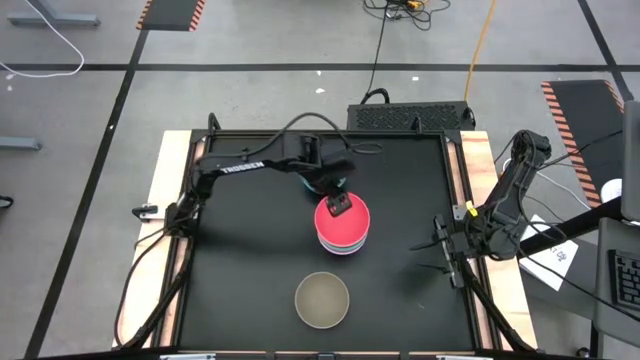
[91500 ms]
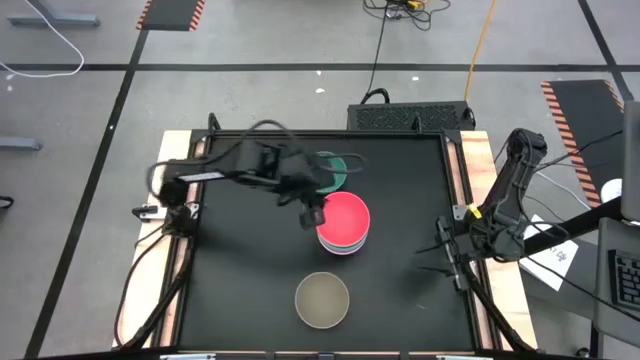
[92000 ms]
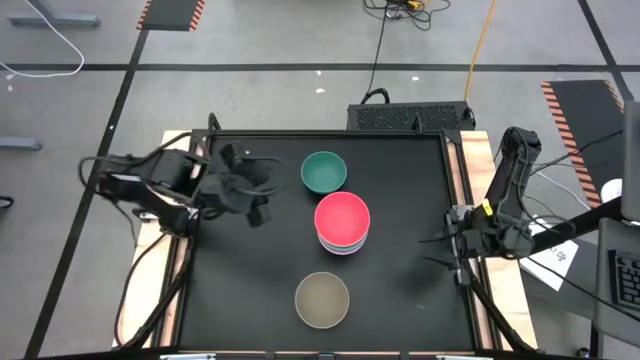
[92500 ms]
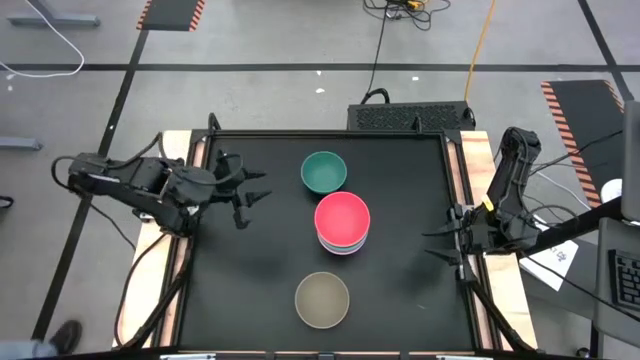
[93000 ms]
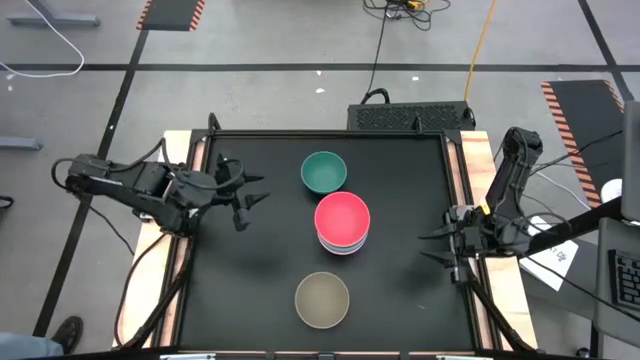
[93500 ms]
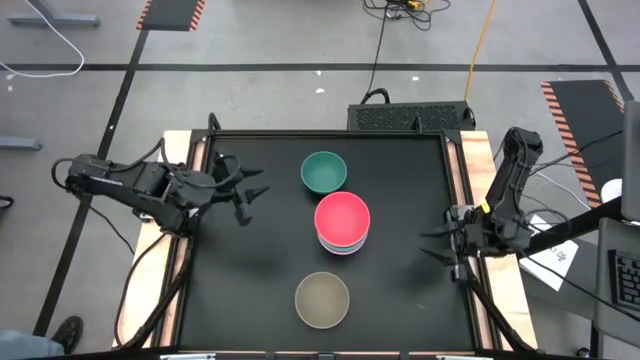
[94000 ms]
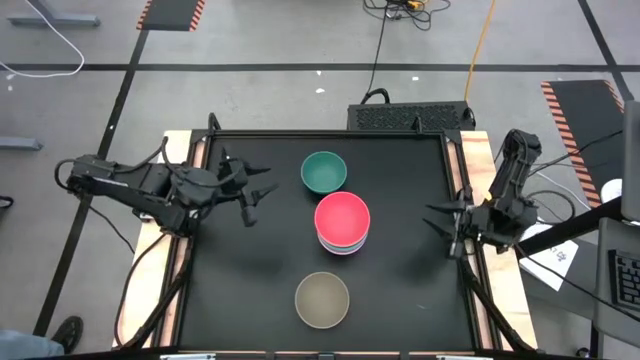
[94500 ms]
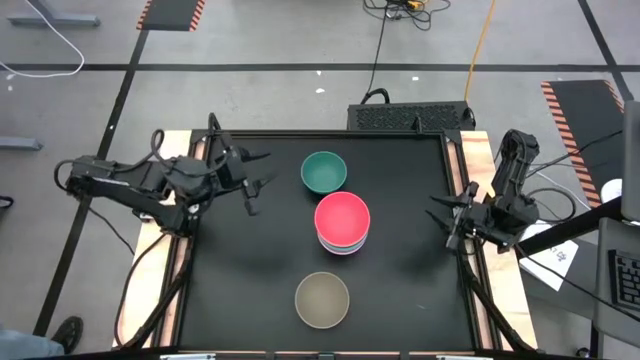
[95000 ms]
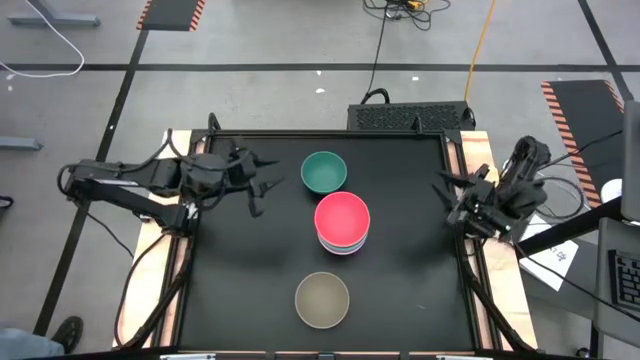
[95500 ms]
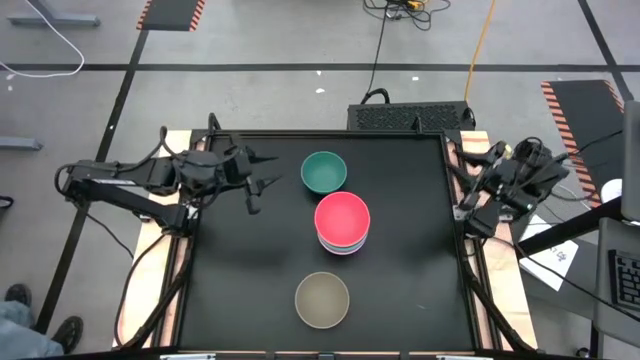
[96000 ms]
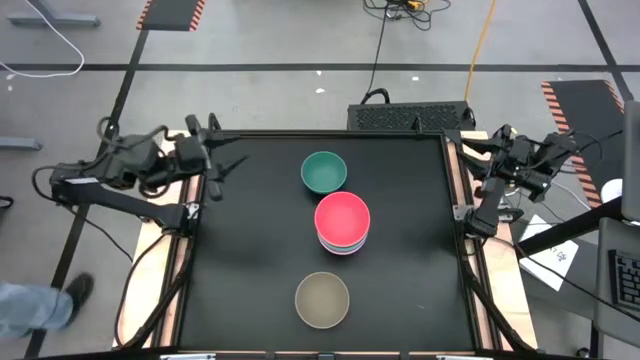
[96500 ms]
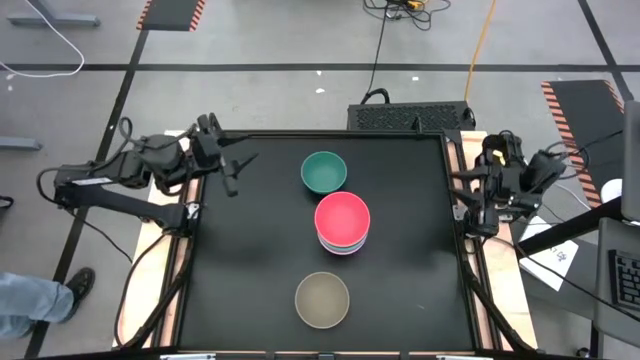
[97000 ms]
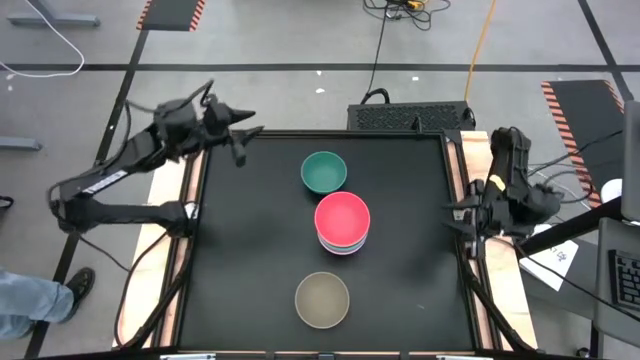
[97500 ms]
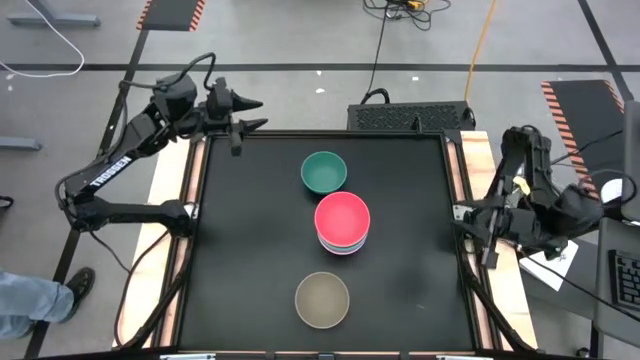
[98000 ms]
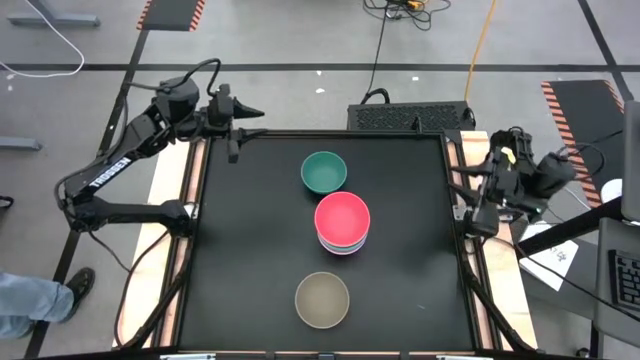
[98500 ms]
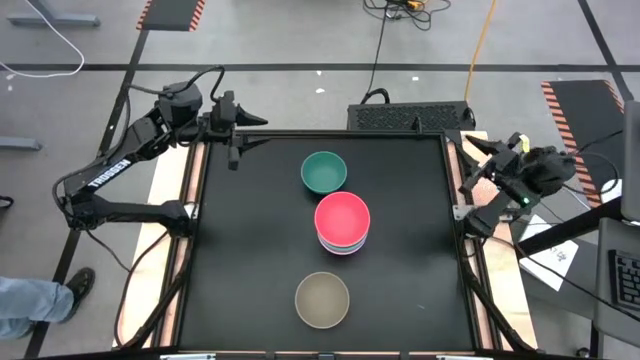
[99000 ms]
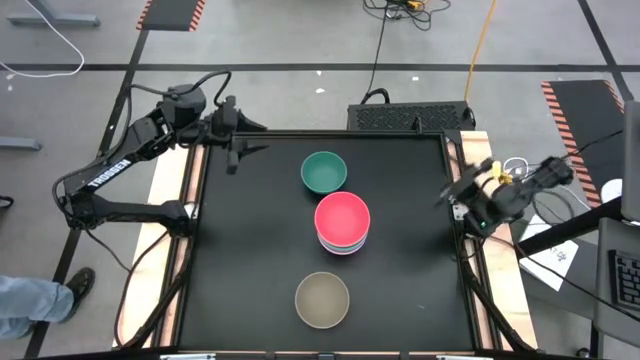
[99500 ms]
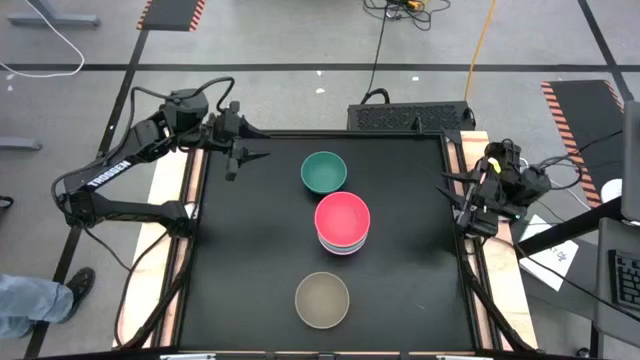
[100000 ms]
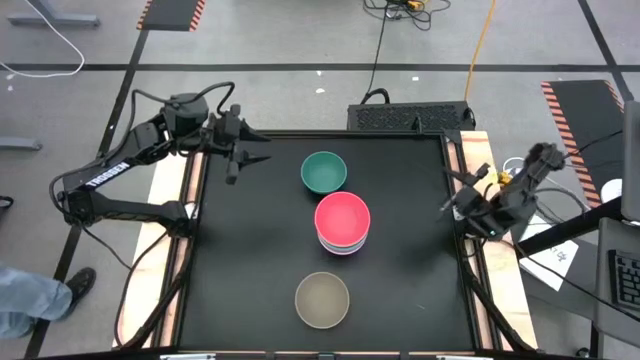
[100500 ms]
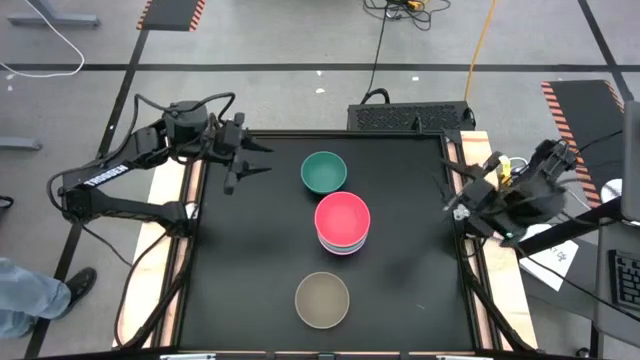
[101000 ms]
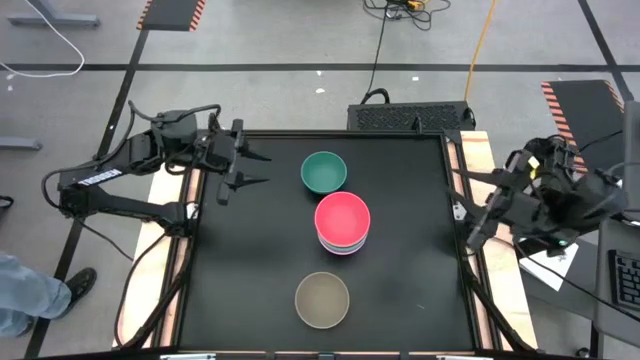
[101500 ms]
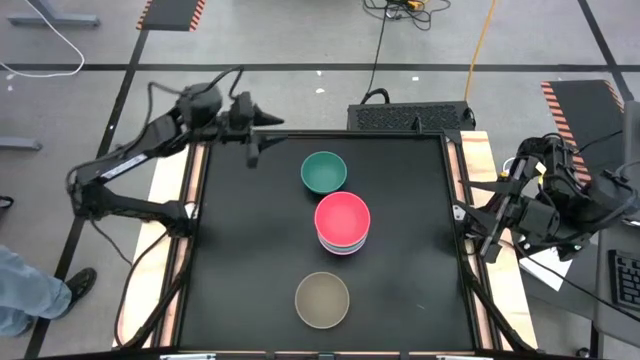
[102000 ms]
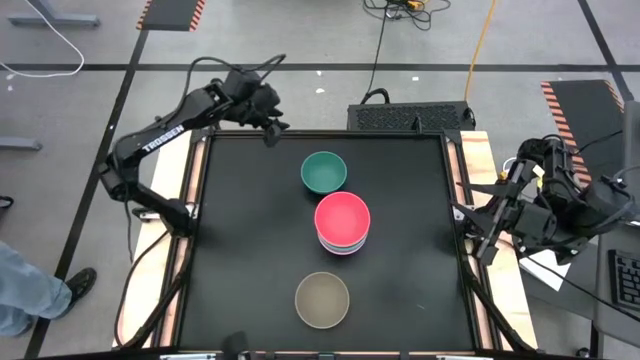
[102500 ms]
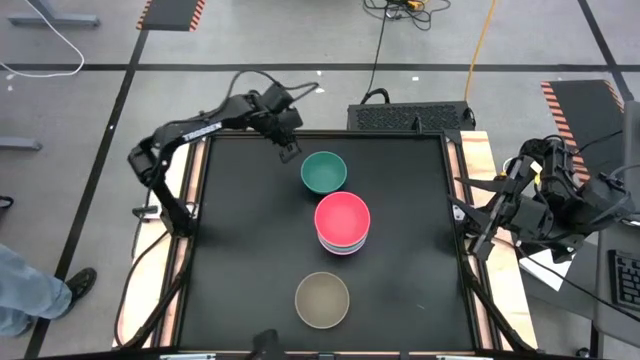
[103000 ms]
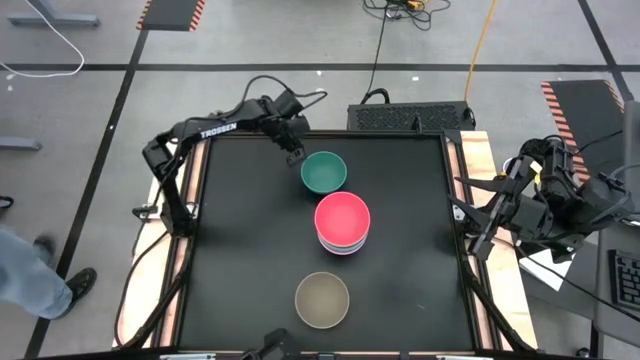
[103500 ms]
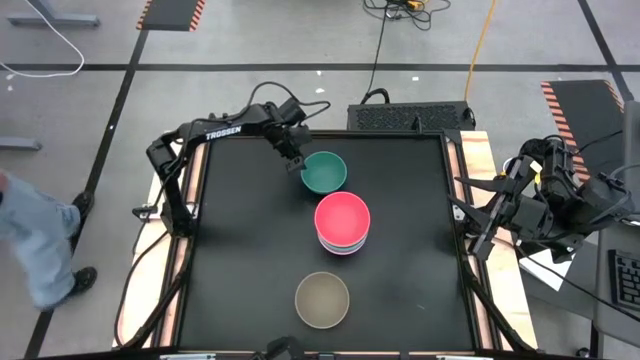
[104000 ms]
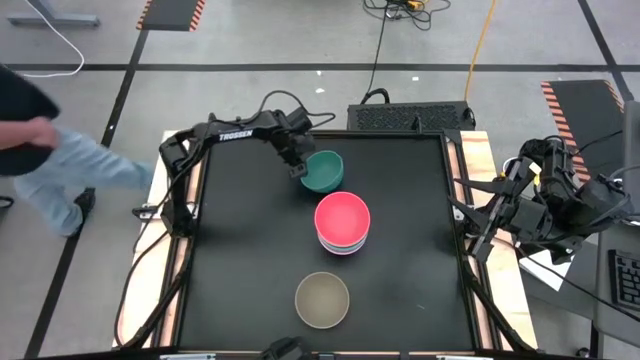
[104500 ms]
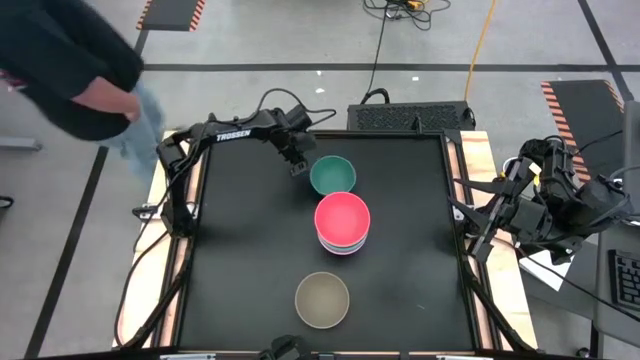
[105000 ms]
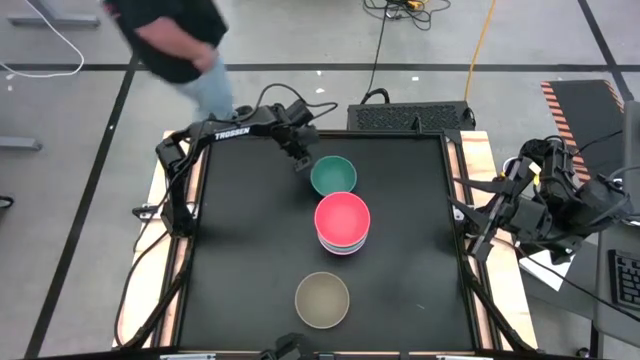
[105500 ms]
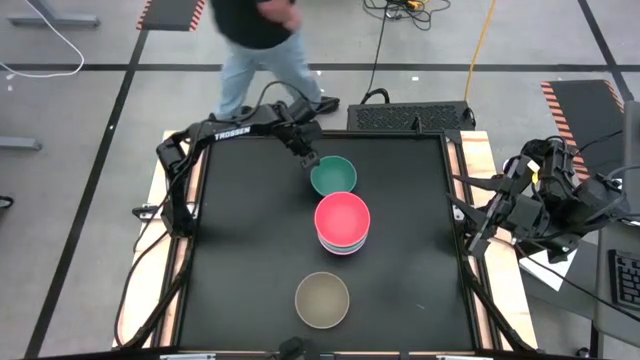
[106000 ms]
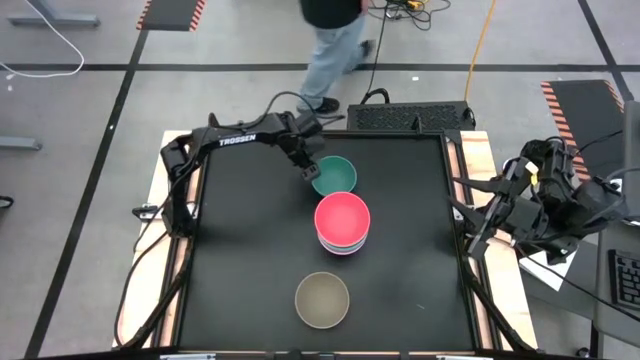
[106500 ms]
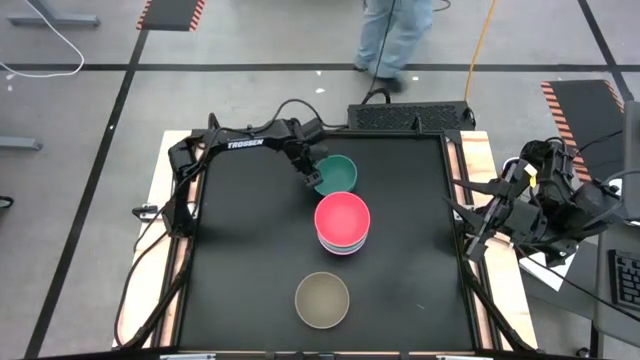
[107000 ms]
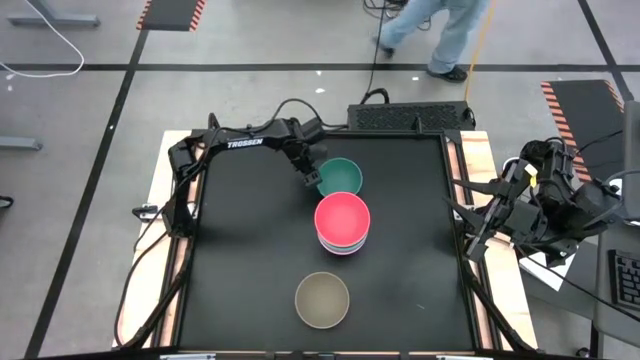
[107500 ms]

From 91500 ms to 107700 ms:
Task: Nest bowls inside each other
Stack the dark green bowl on top of the light pink bowl

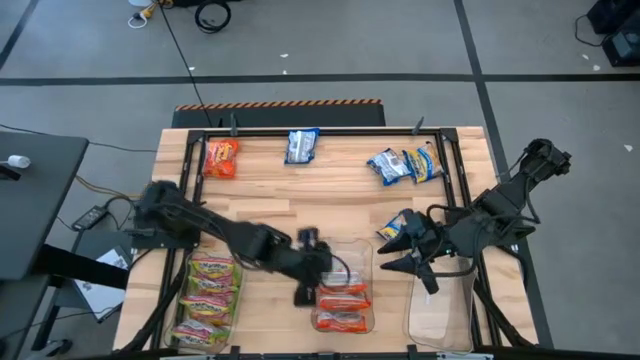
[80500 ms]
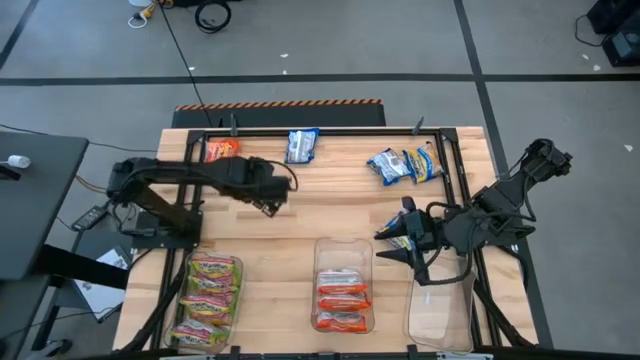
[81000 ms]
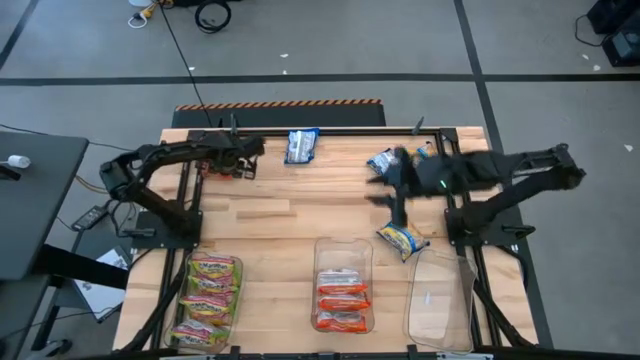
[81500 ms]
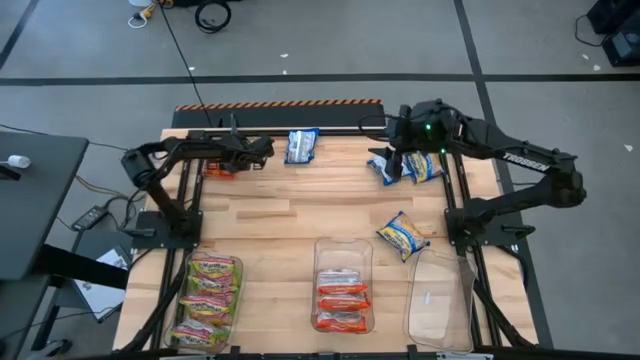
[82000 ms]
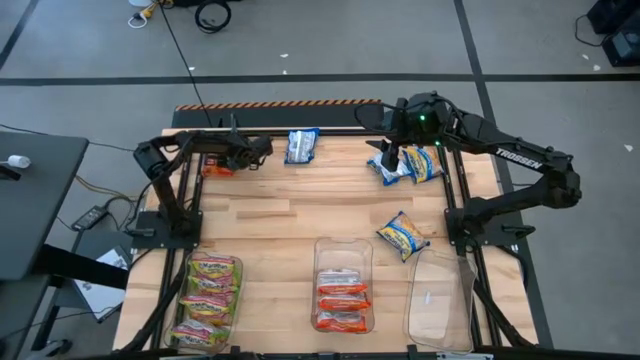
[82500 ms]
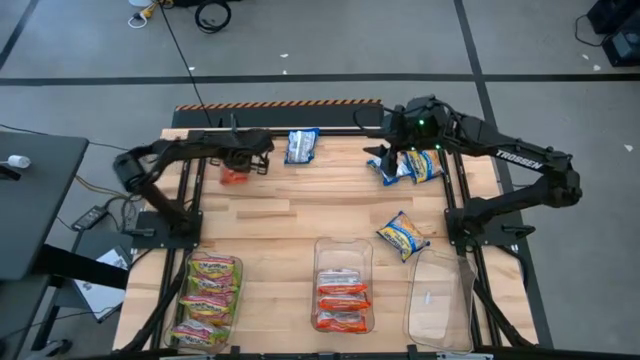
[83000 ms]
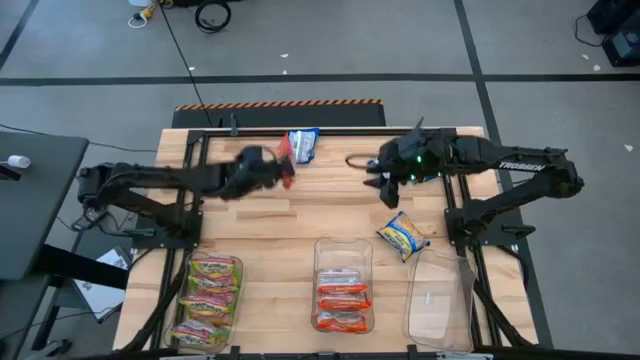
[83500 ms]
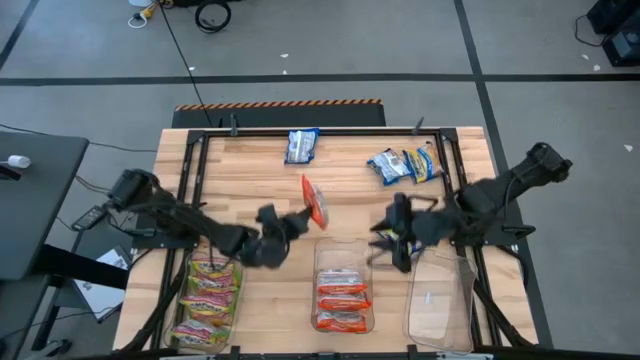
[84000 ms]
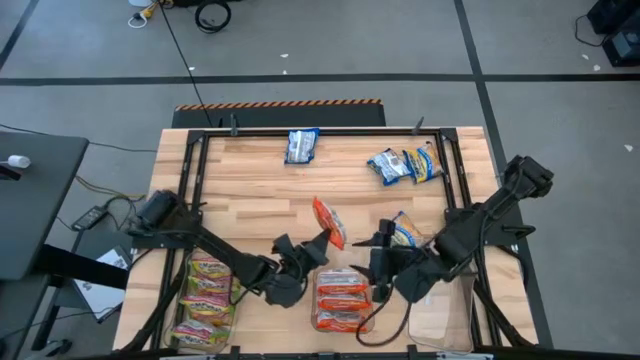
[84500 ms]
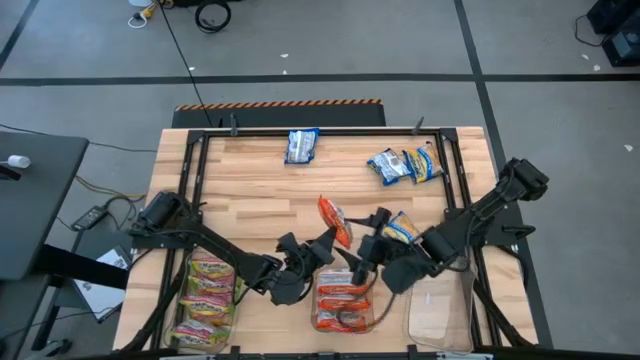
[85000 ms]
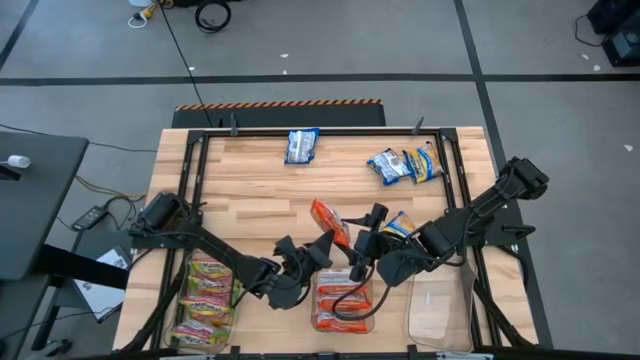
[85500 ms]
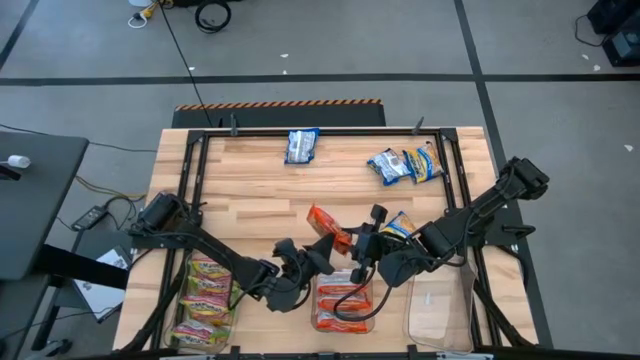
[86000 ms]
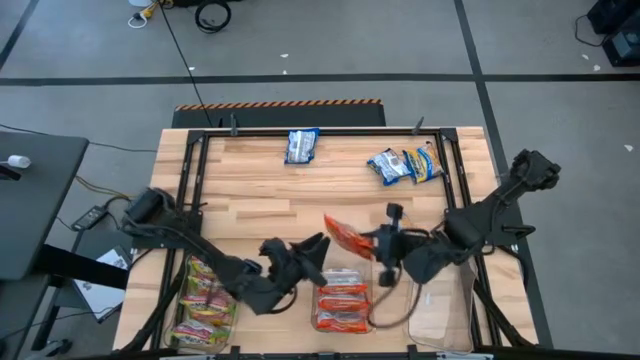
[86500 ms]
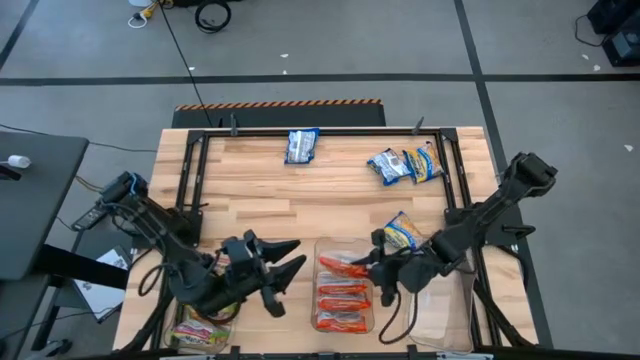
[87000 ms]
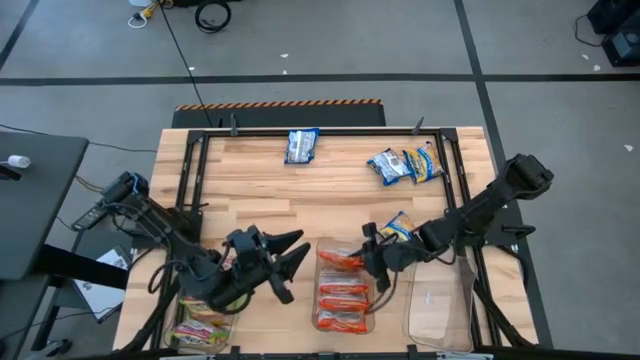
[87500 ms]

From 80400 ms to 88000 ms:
Task: Sort Maruchan noodles
Put the orange noodle pack into the middle transparent bin
